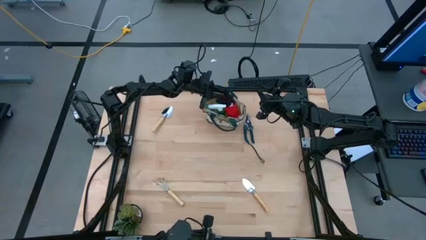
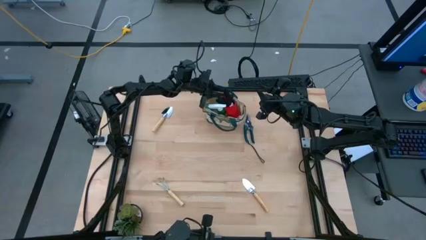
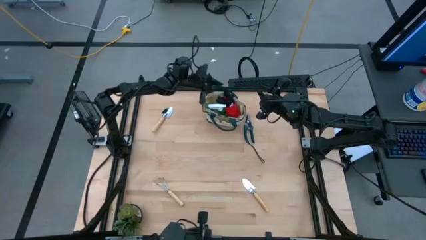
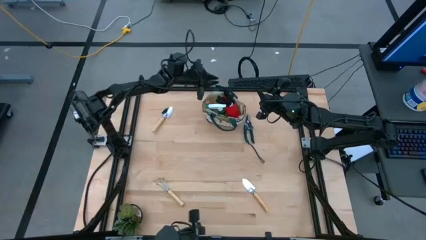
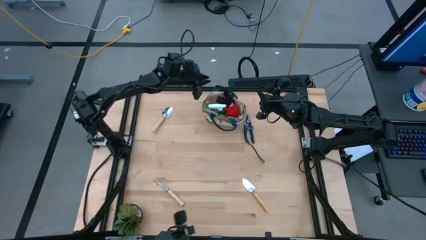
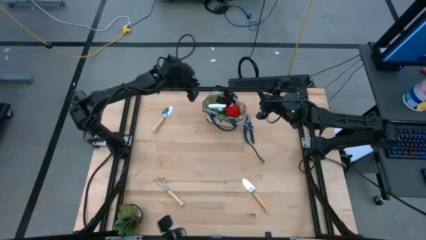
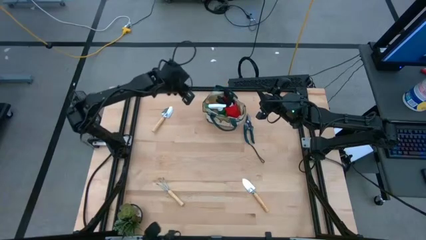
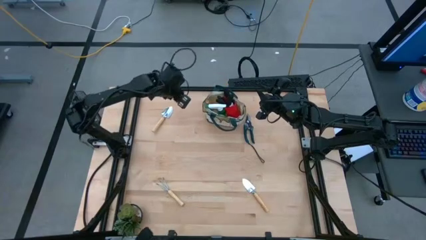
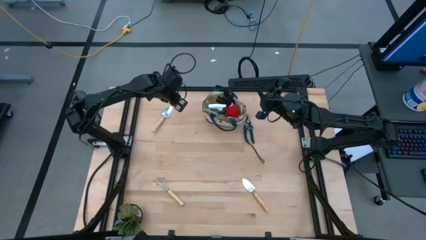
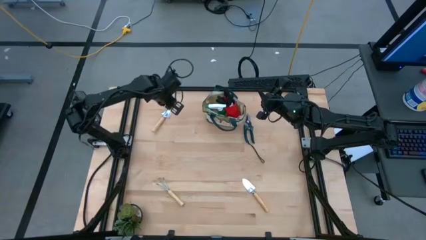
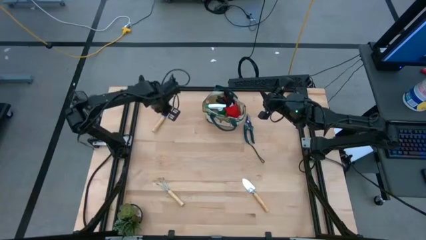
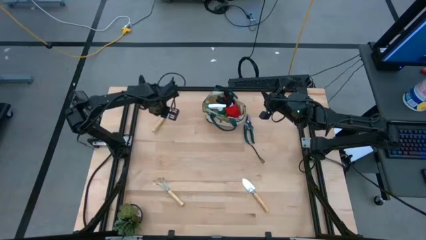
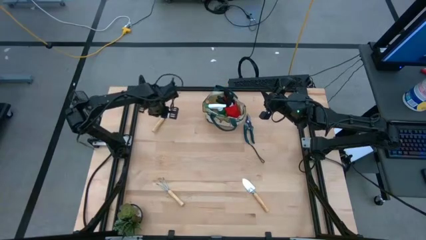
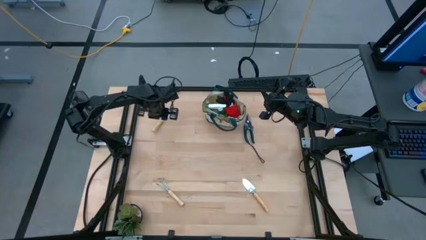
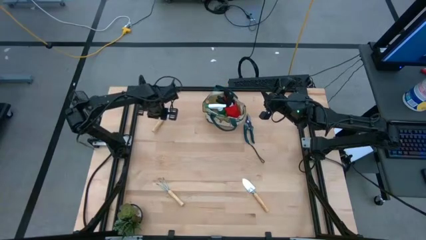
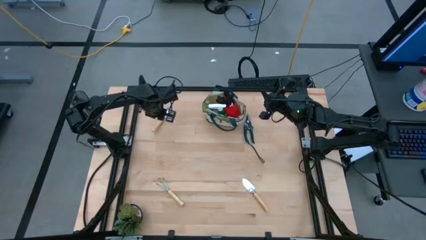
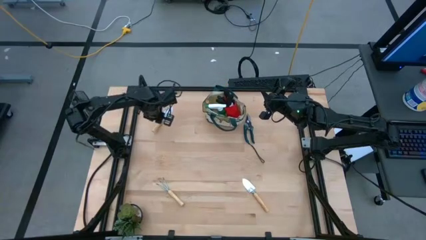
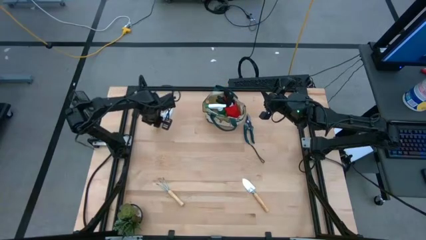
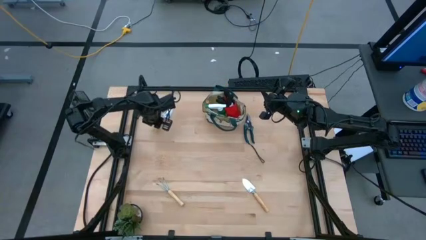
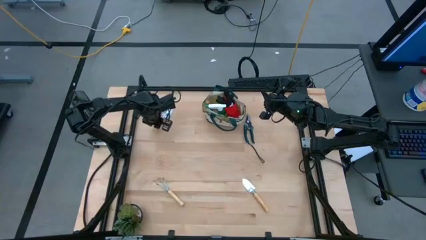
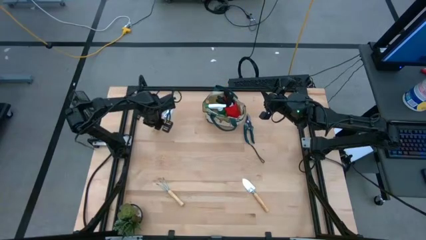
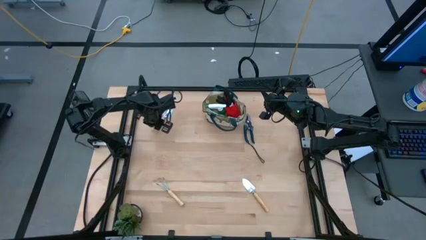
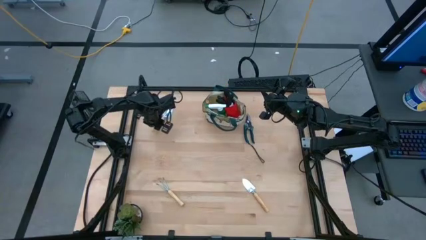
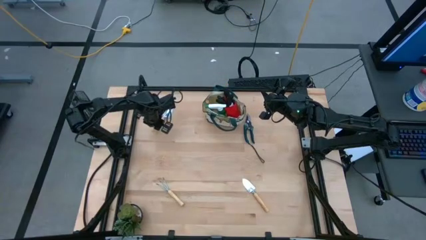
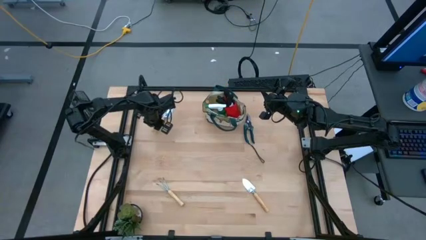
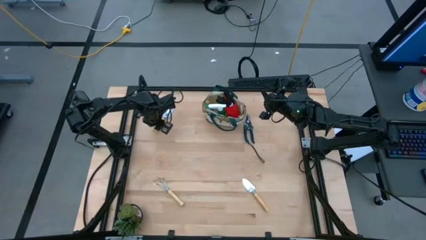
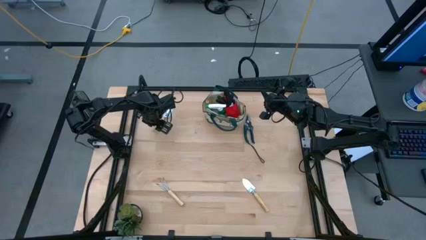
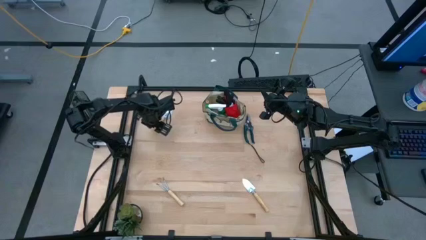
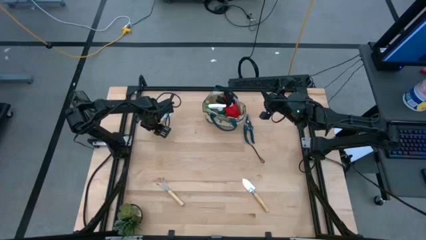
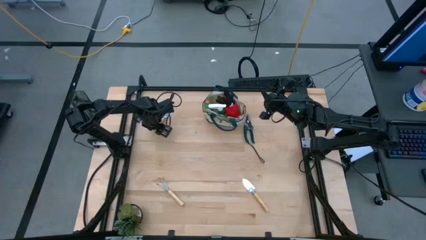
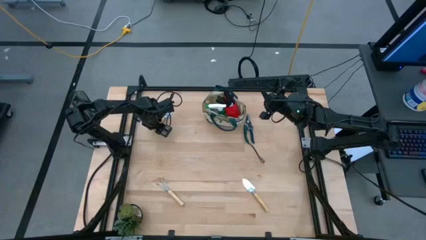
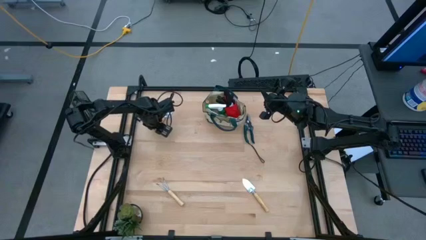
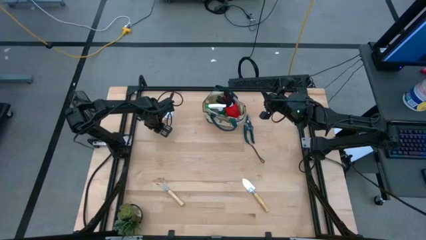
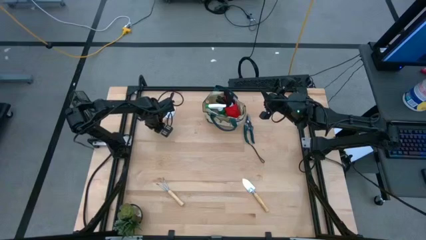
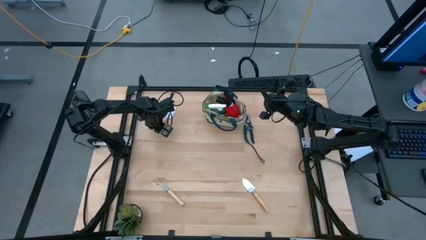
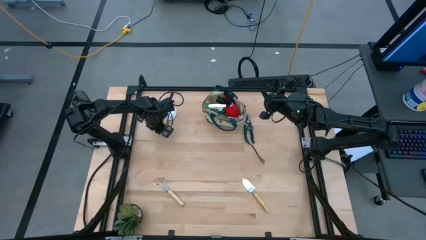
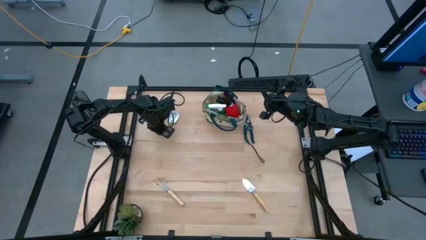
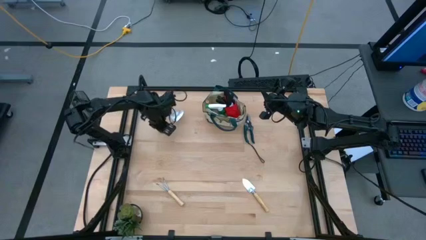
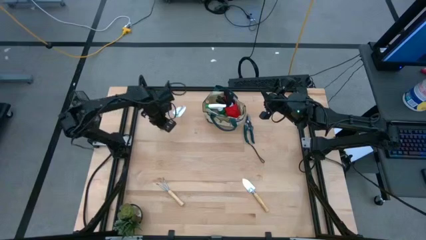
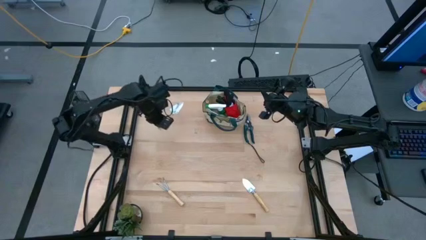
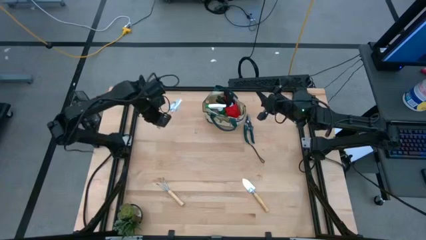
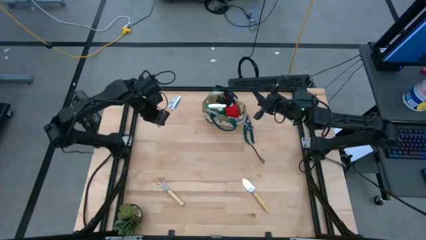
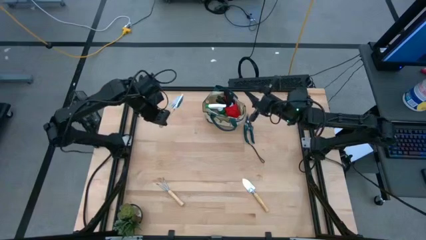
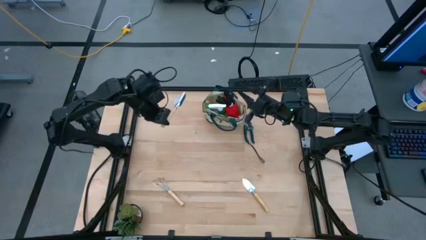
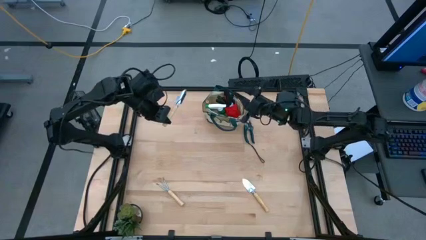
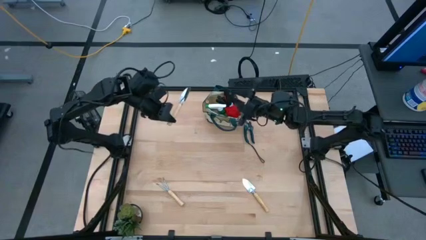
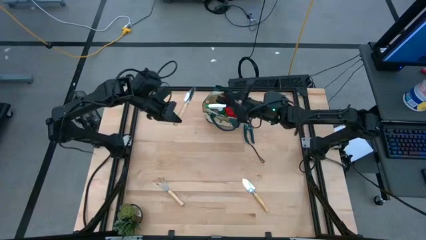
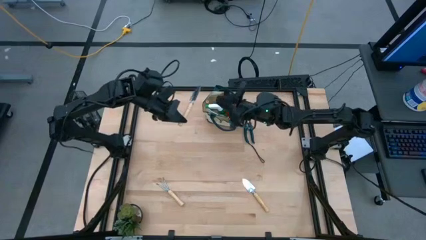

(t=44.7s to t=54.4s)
Task: Pick & Place Garden tools in Gardening bag
Put the top brown trowel into the green gardening bag

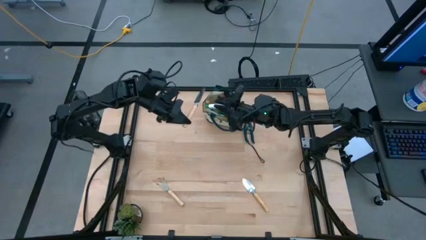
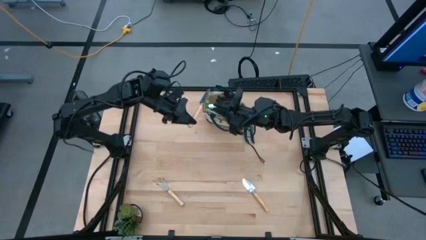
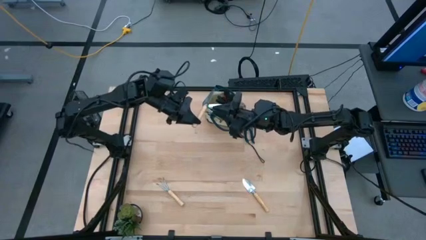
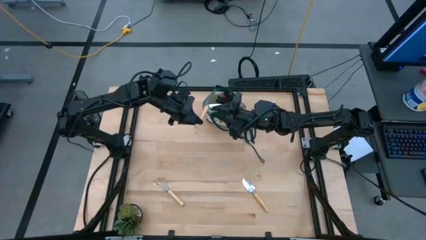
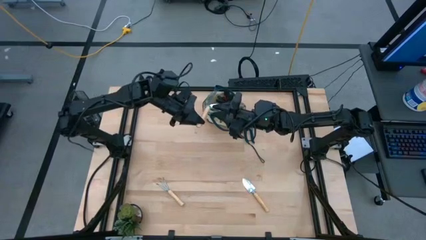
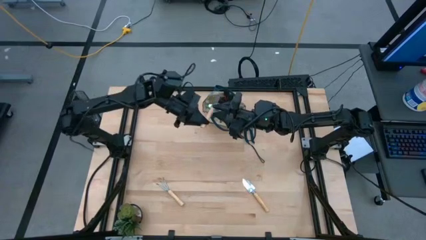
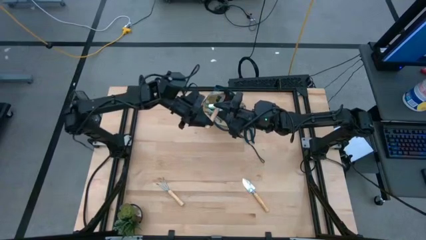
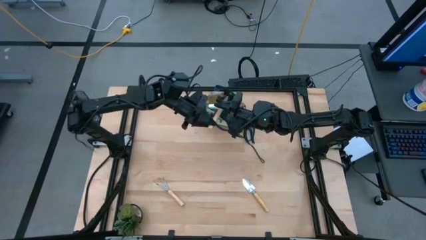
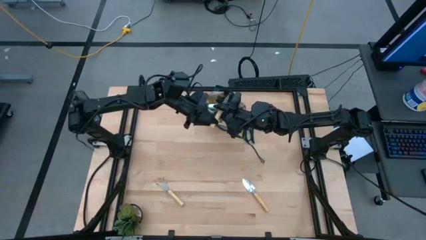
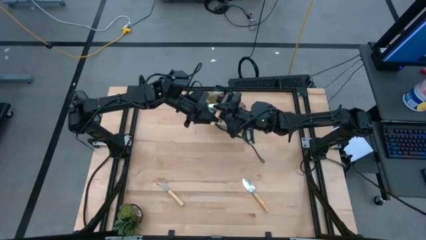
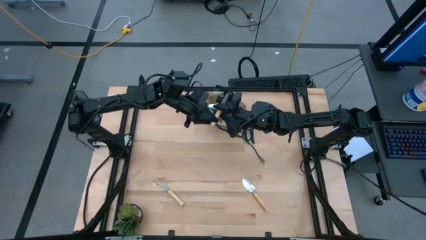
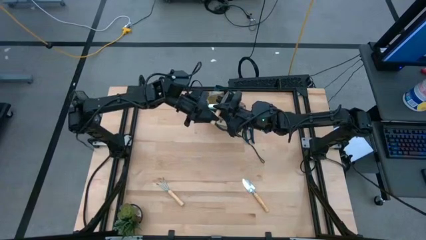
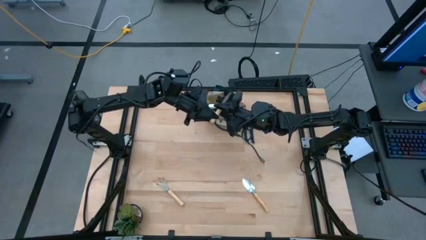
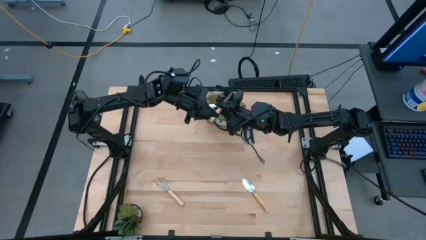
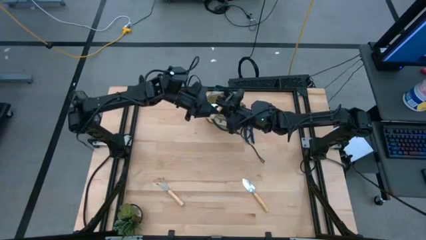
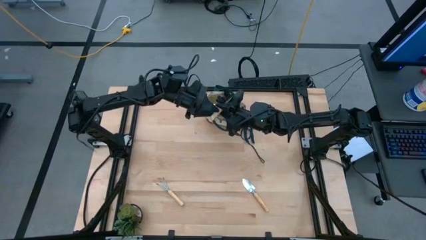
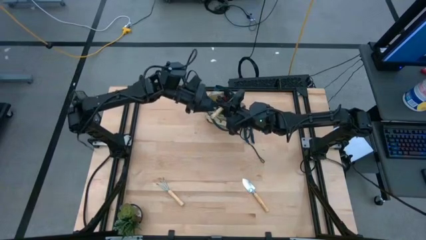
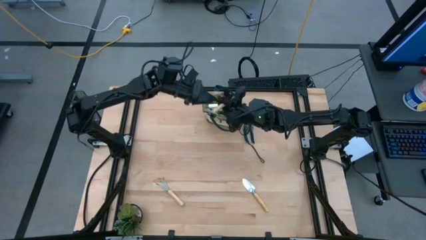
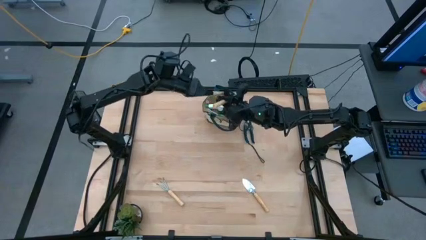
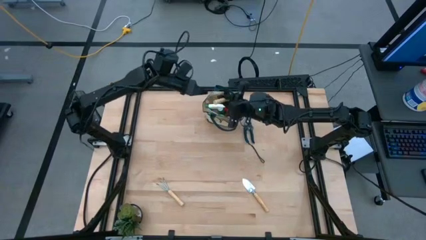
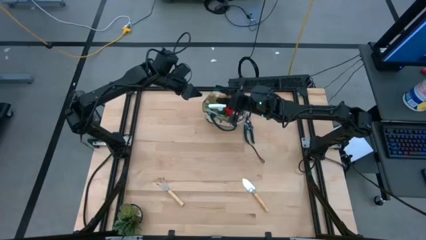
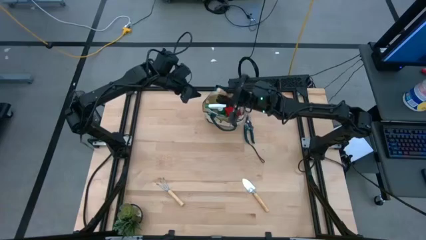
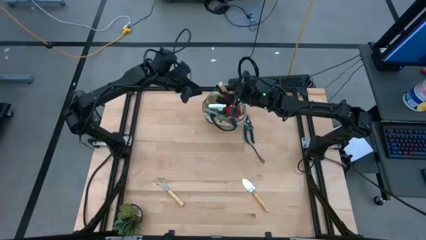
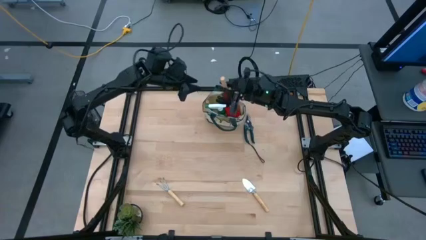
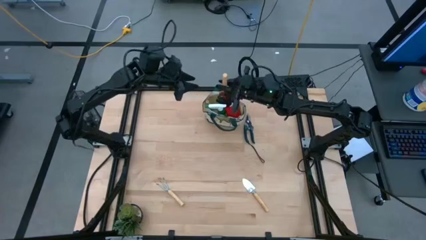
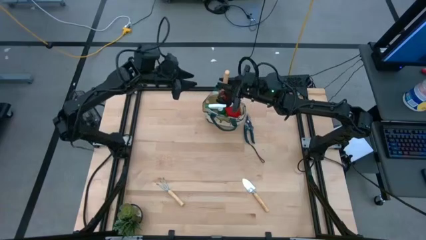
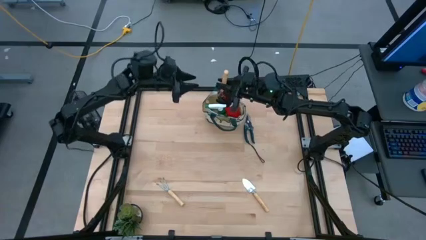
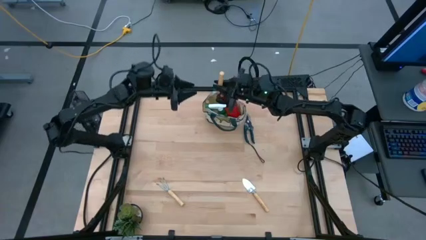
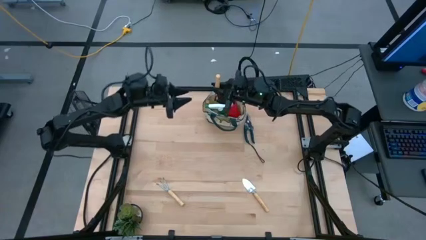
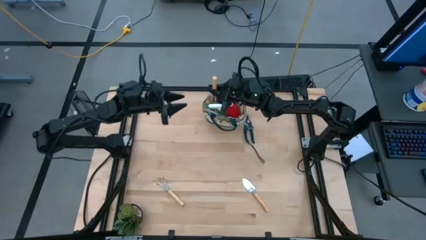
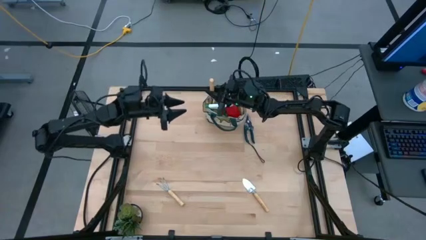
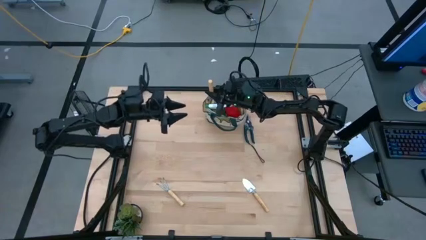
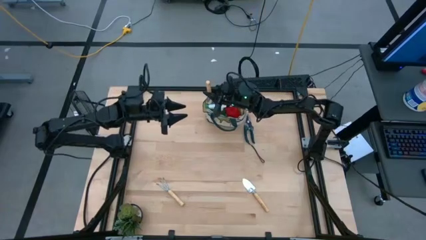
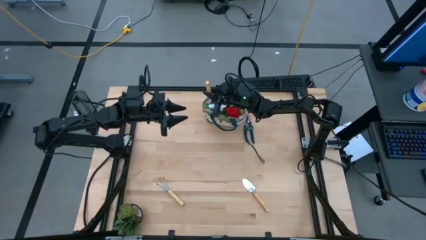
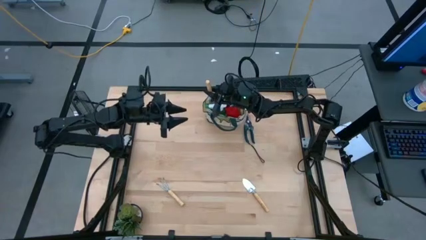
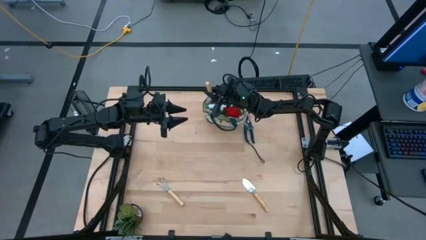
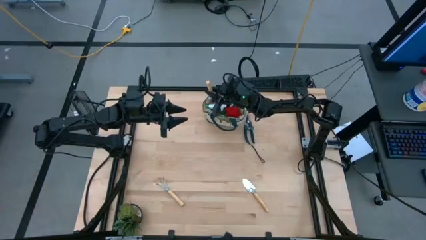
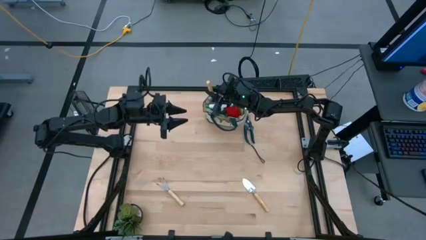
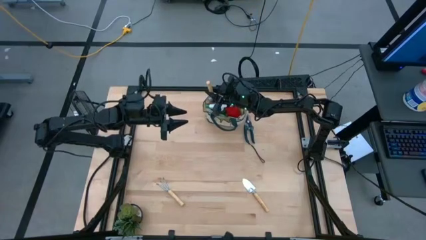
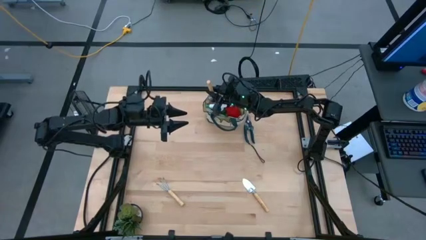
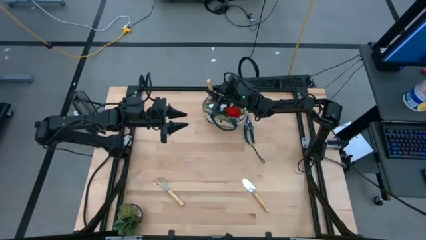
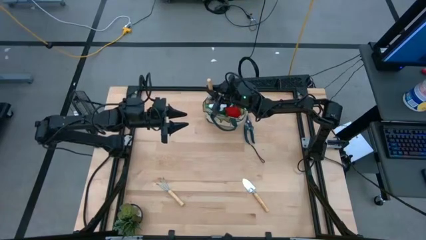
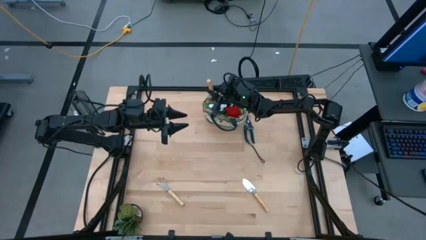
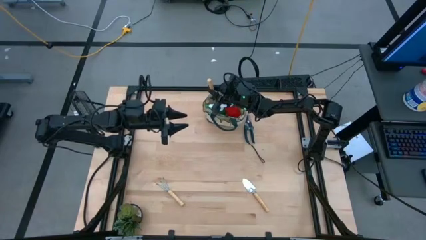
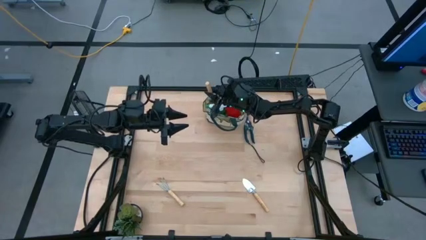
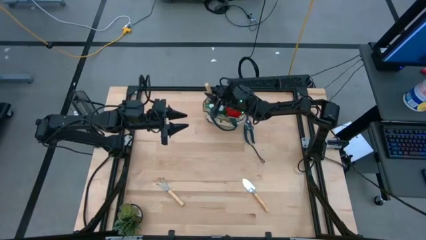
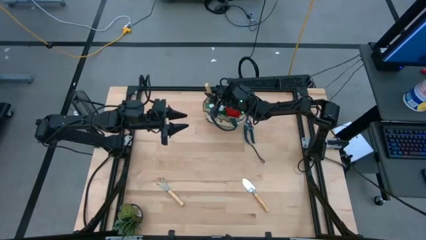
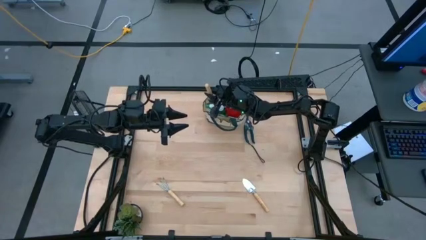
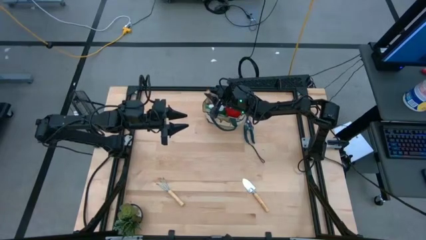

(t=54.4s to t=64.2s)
Put the top brown trowel into the green gardening bag
